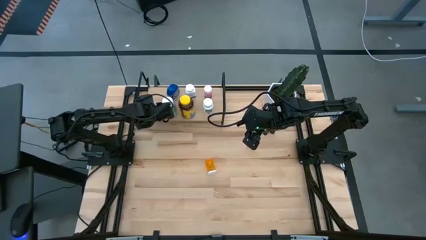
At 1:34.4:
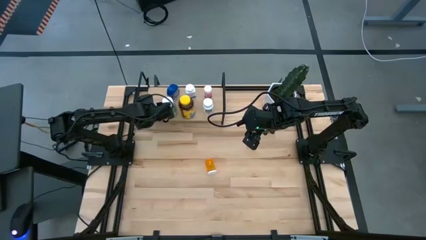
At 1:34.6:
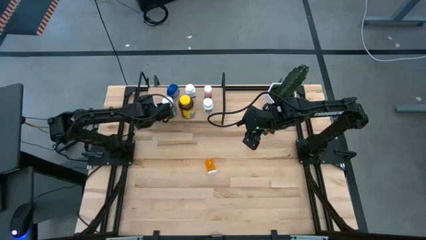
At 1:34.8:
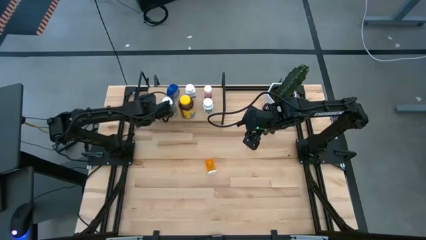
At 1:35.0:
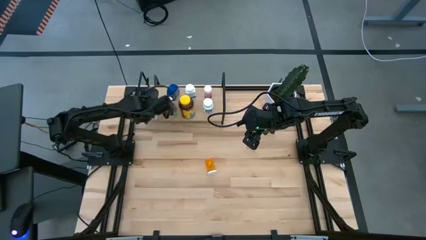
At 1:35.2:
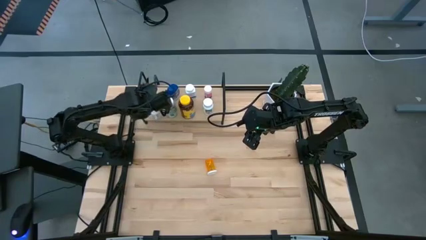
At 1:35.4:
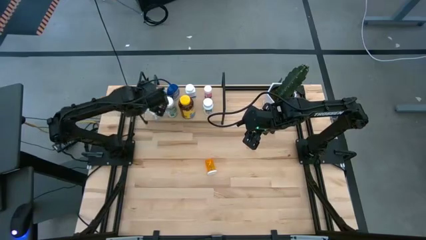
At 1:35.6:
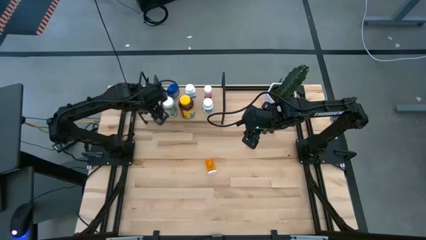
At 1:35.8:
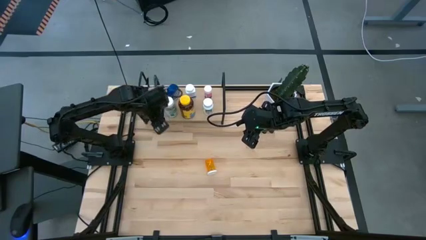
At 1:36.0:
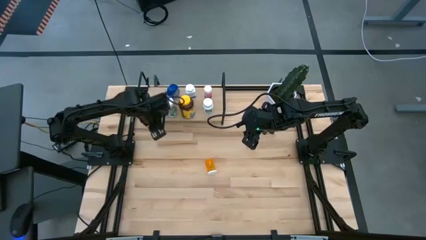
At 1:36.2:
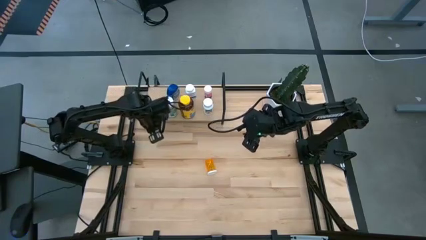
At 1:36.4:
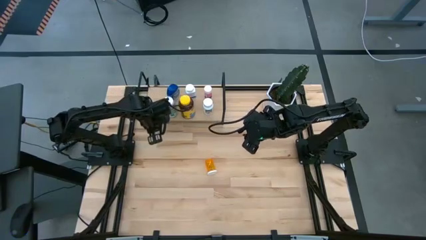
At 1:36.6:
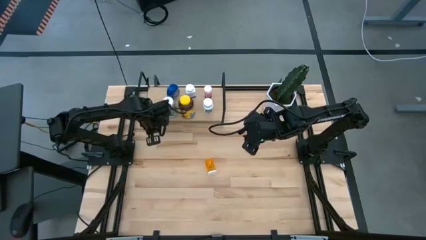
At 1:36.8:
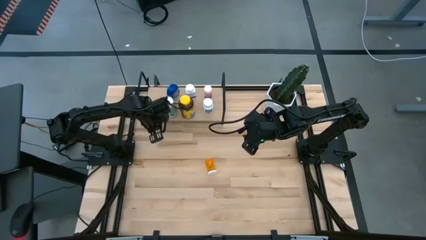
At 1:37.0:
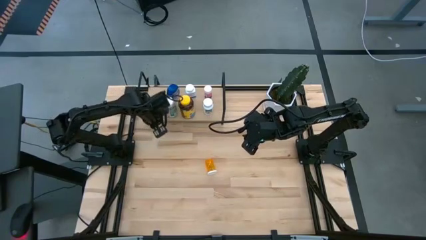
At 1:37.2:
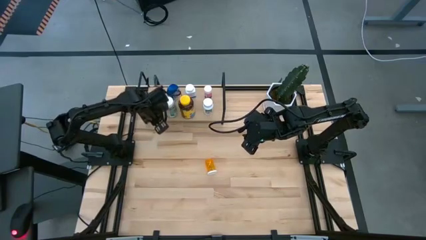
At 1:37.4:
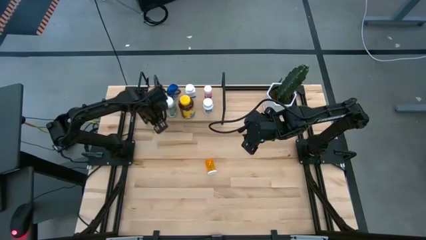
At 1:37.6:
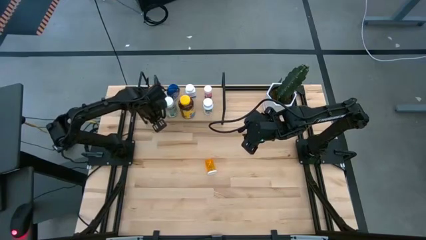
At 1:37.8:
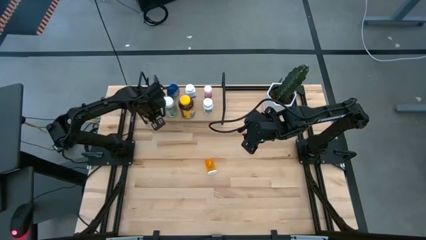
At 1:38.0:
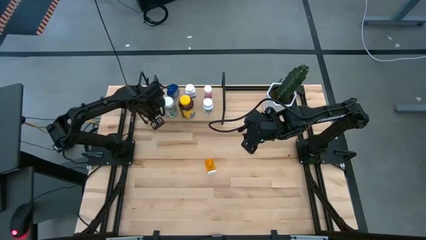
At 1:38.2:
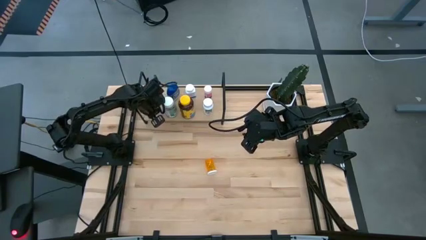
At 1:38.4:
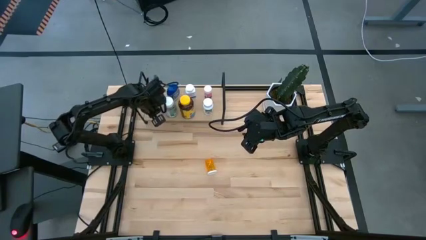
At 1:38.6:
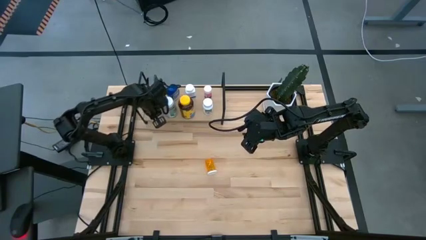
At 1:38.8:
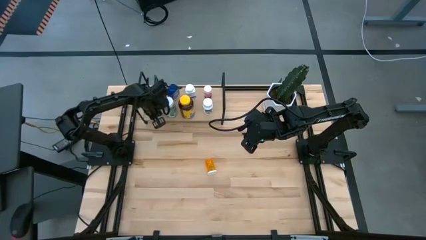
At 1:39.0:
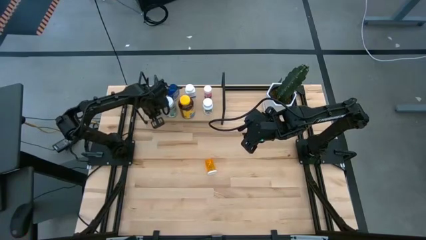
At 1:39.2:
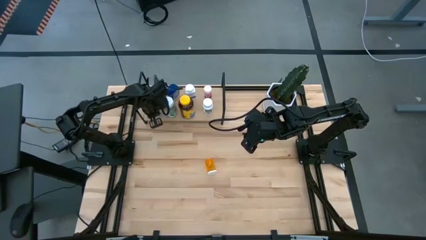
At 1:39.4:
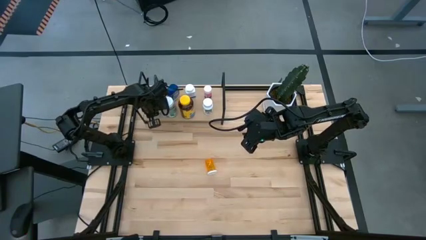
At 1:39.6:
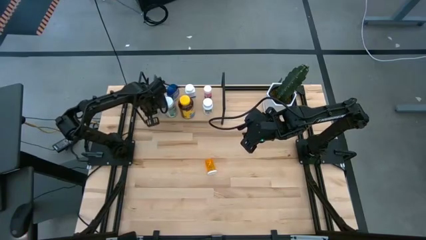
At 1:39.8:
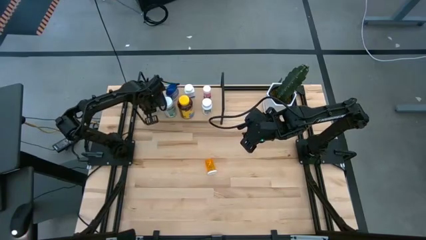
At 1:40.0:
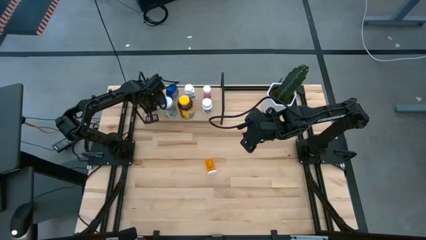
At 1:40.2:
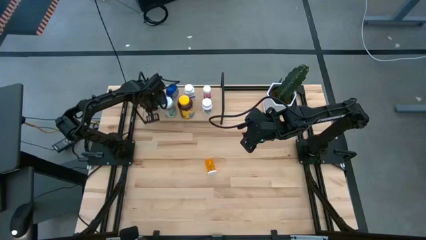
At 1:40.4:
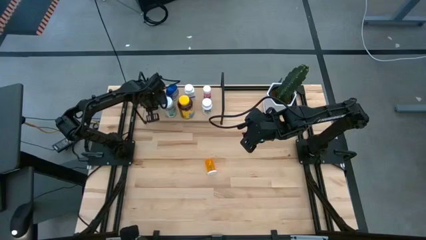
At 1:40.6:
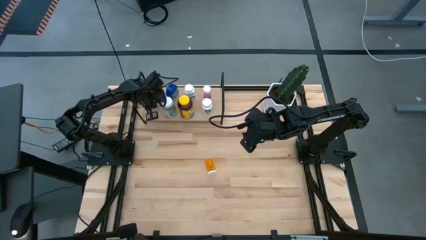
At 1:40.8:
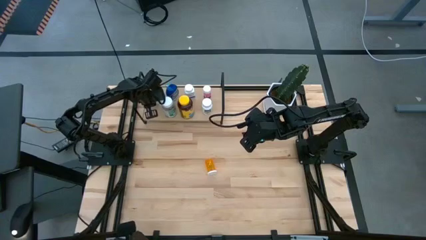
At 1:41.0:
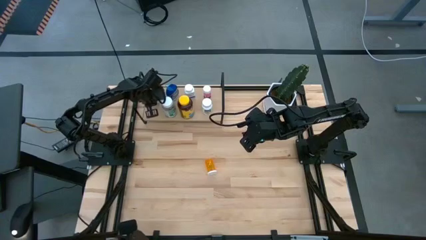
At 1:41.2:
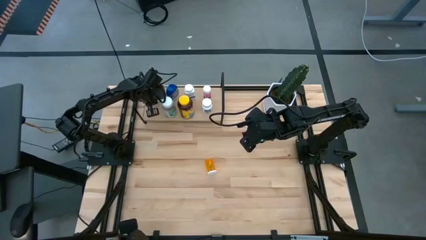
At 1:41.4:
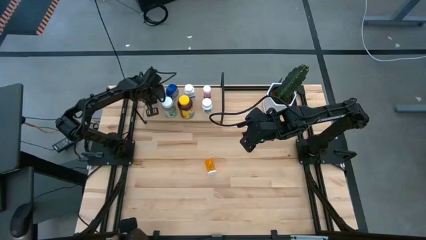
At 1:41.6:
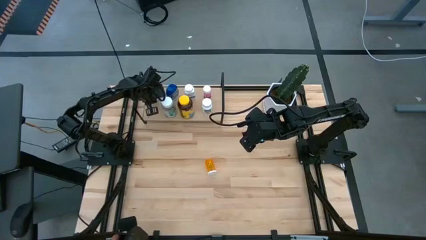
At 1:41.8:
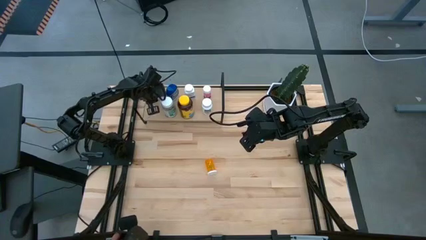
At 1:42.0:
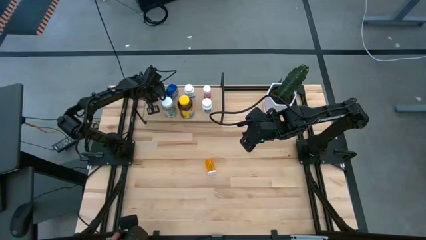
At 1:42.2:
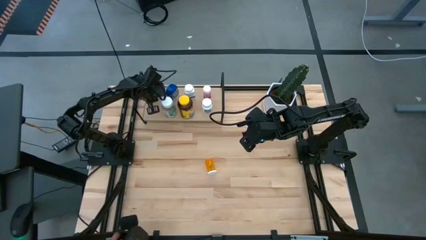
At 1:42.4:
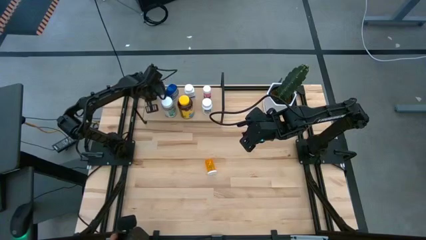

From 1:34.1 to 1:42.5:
Task: Pick and place medicine bottles onto shelf by color
Adjust the white pill on the shelf

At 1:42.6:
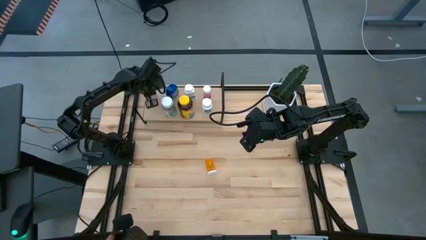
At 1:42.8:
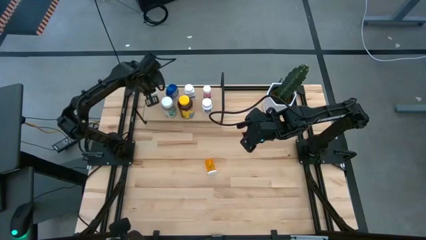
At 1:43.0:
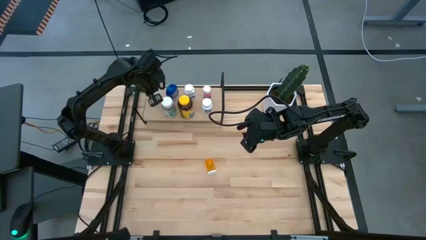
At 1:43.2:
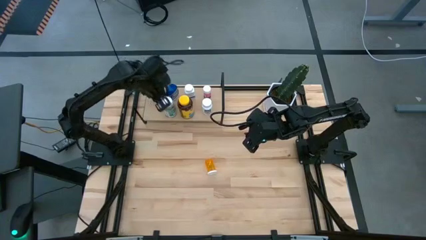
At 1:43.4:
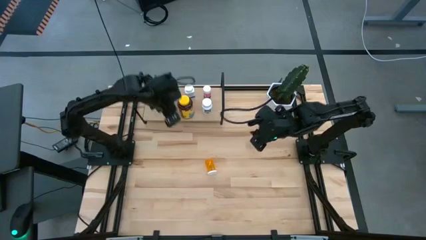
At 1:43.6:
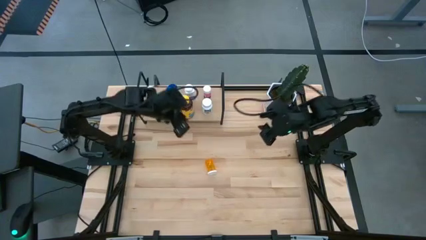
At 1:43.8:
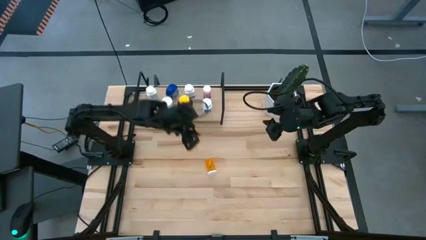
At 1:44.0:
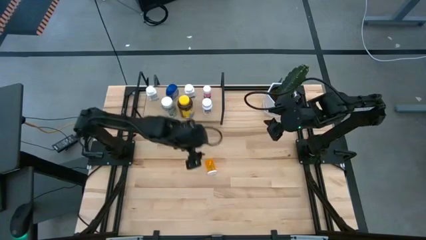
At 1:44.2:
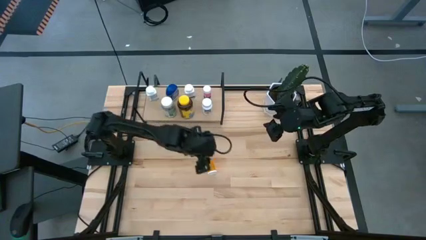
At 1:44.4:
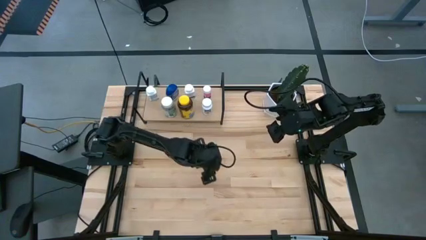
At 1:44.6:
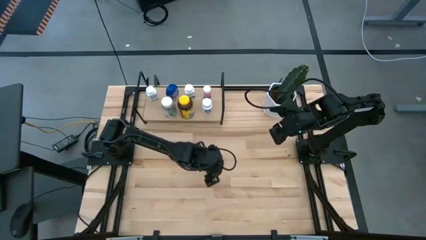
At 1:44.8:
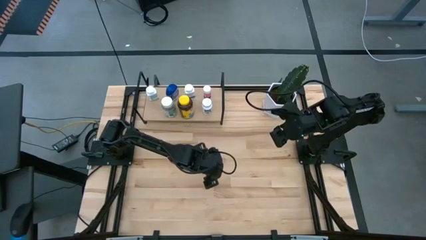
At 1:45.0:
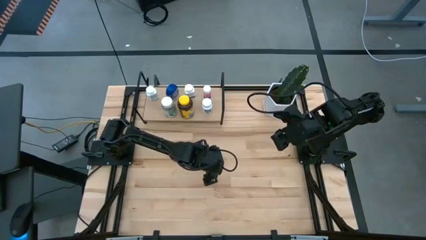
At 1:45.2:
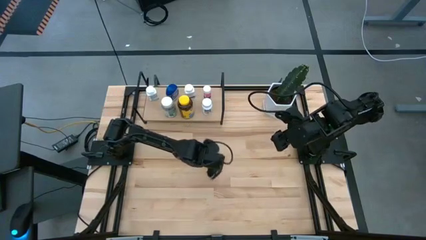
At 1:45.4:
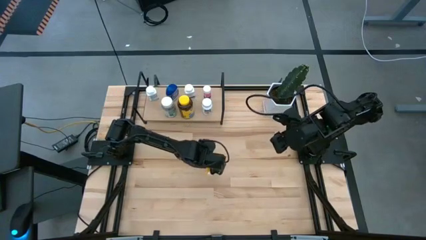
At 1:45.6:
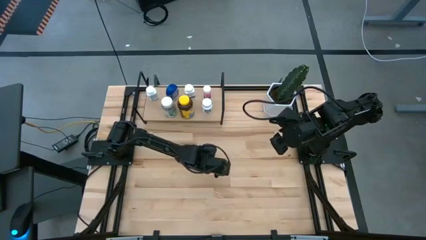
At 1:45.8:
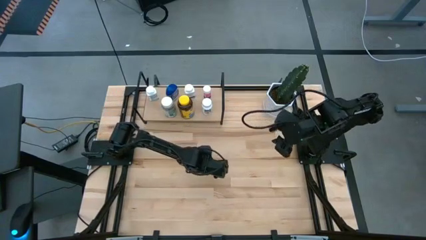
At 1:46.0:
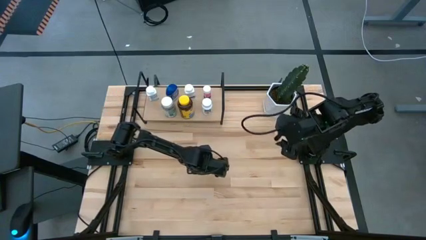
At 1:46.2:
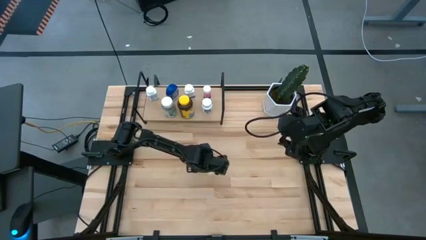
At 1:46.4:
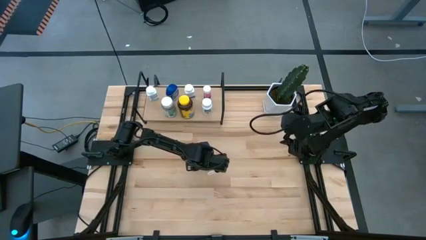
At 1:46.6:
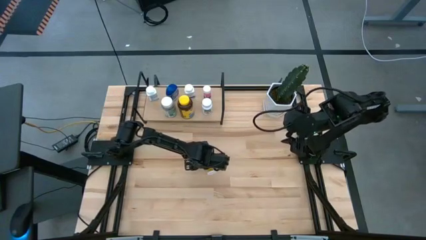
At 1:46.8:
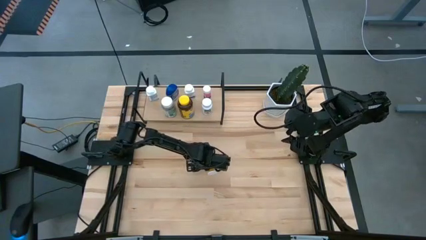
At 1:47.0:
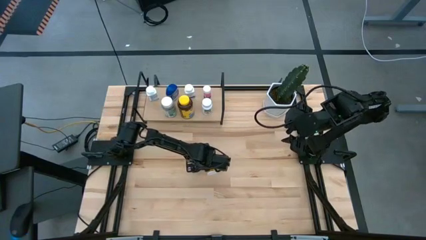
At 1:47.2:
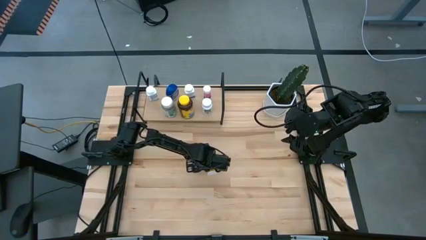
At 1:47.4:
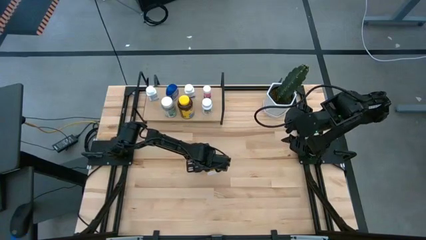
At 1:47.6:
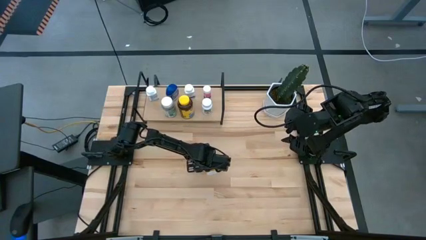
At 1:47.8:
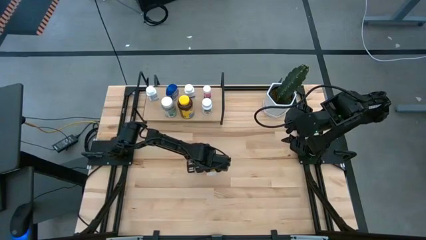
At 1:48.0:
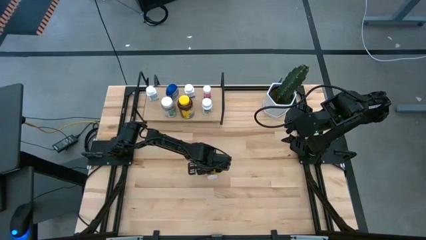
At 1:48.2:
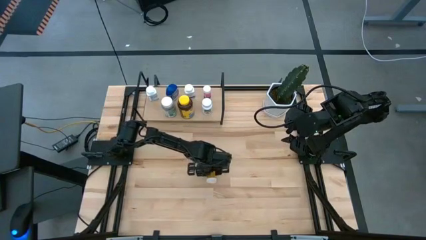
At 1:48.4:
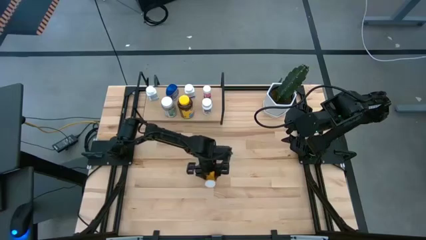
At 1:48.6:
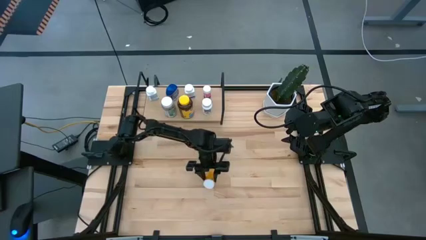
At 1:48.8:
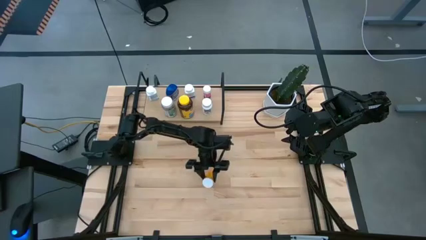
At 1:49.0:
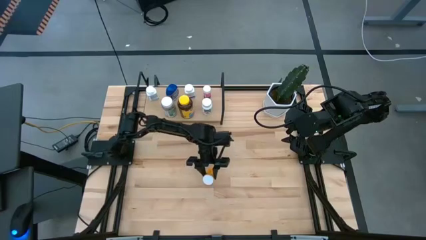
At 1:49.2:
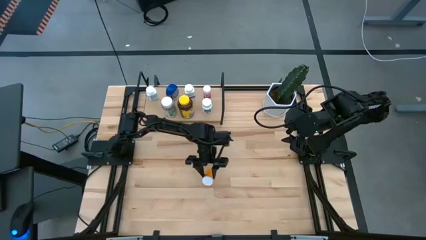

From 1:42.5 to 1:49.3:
Put the orange pill bottle on the shelf

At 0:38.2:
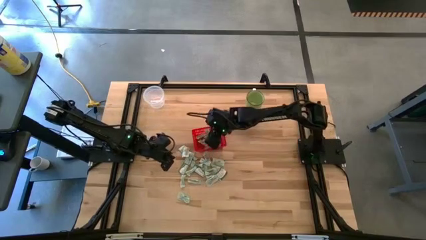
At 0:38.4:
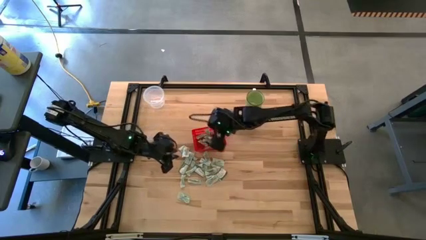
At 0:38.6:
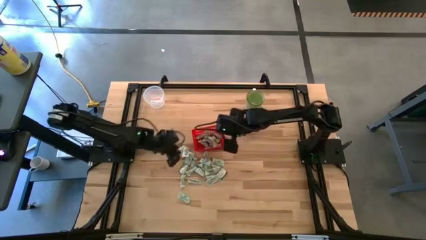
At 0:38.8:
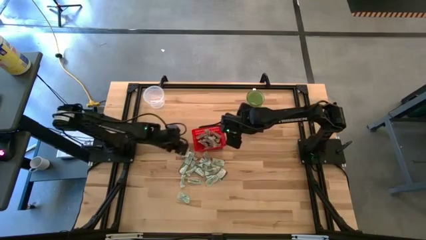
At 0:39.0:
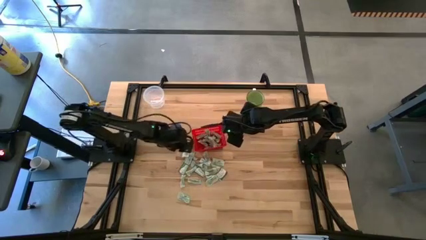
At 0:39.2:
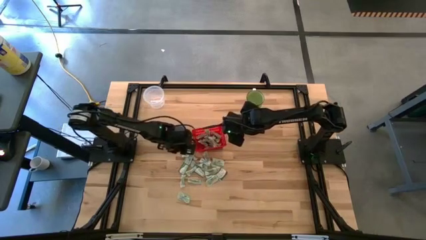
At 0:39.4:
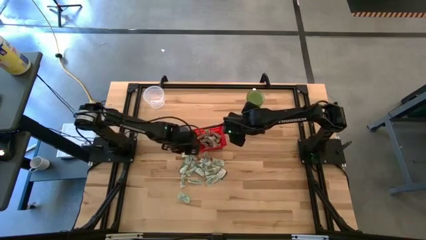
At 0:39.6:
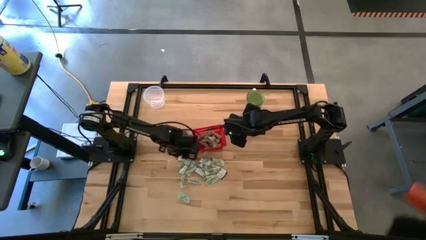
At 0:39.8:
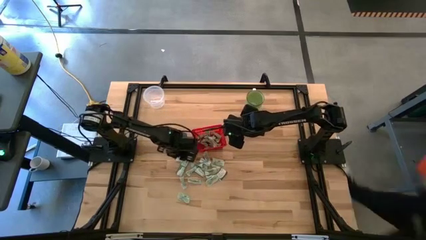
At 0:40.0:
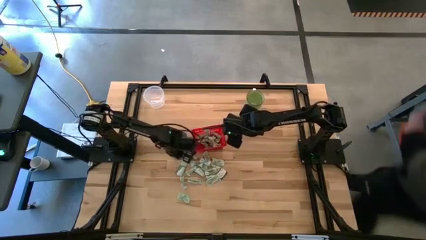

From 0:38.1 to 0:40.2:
Task: Pick and place Stevia / Truvia into bins
Put the stevia packet into the red basket
